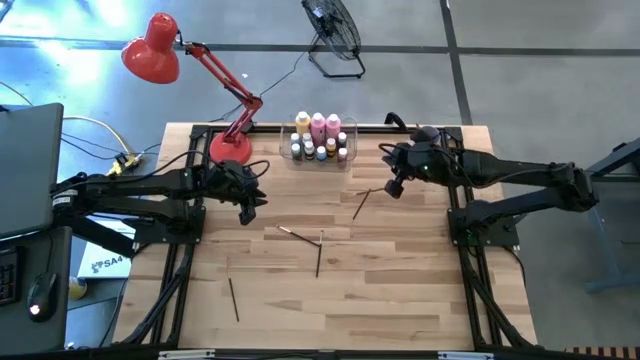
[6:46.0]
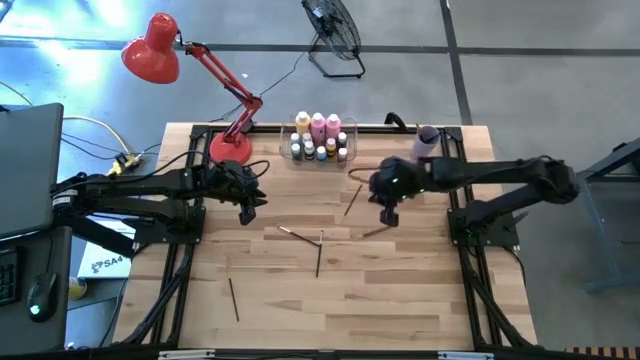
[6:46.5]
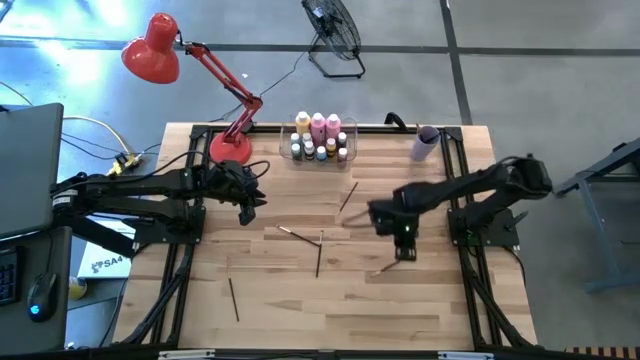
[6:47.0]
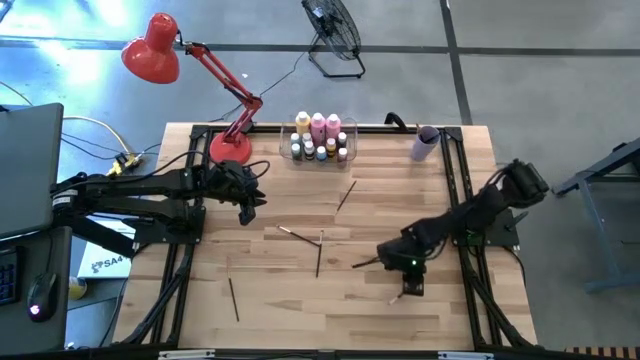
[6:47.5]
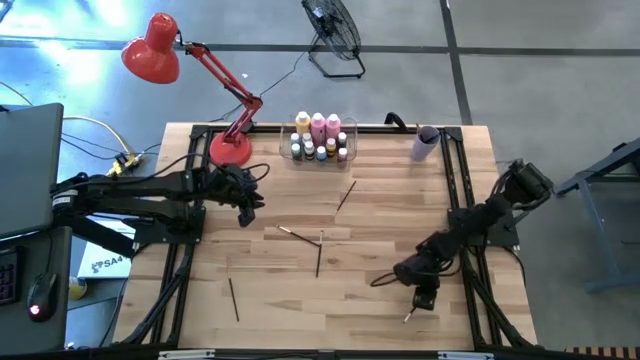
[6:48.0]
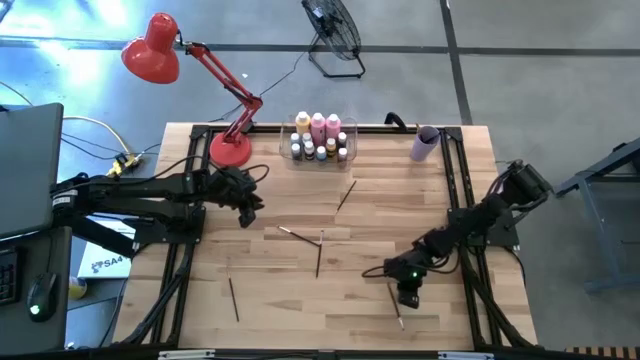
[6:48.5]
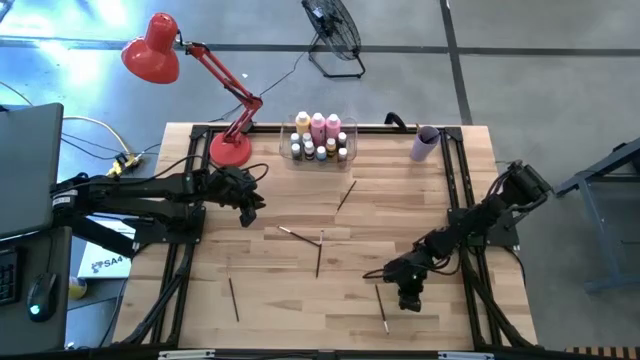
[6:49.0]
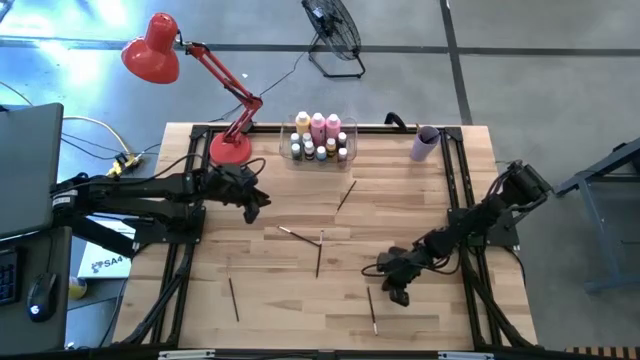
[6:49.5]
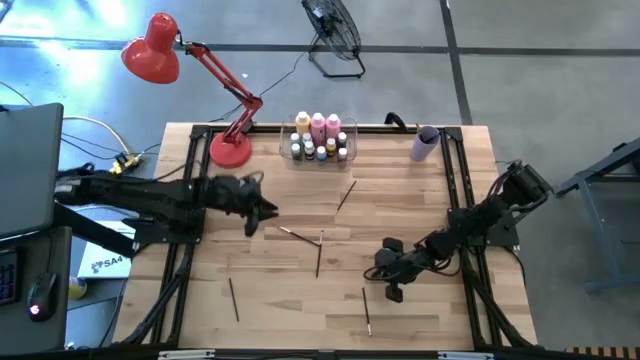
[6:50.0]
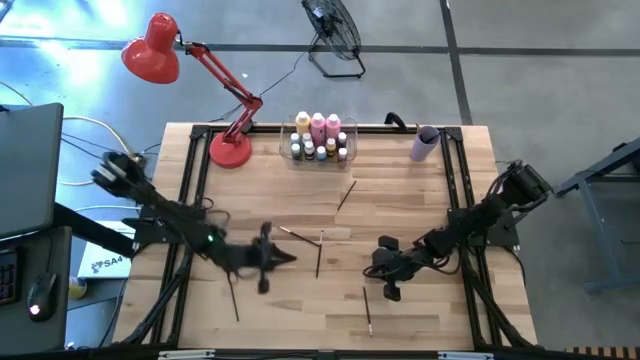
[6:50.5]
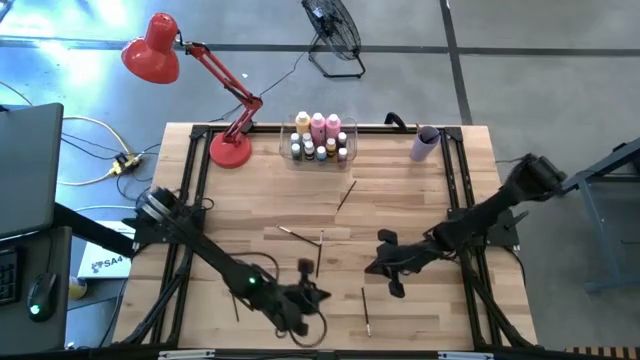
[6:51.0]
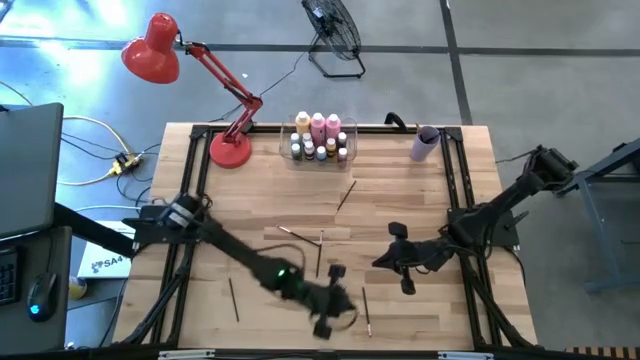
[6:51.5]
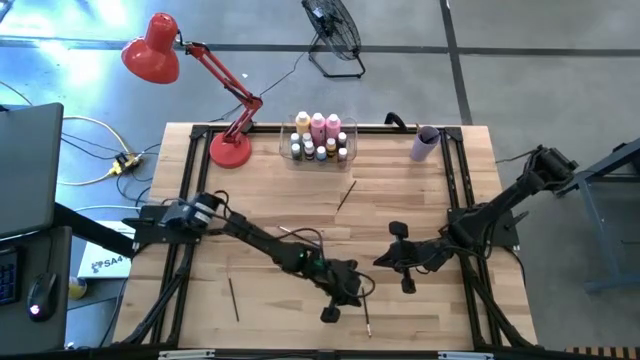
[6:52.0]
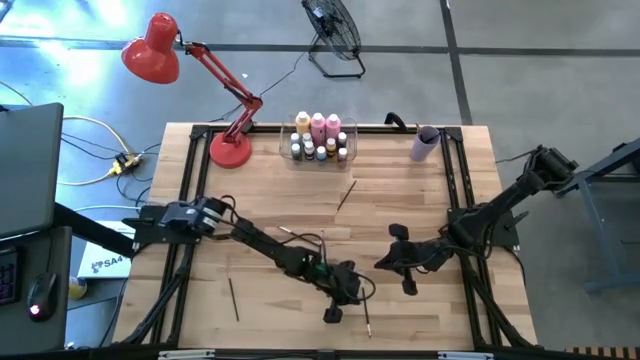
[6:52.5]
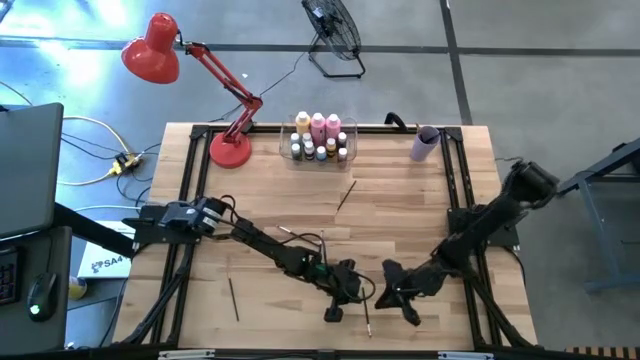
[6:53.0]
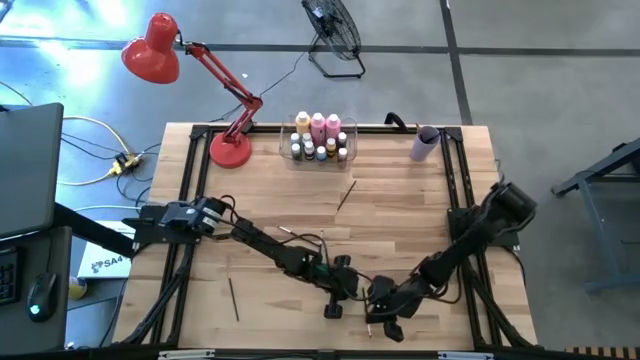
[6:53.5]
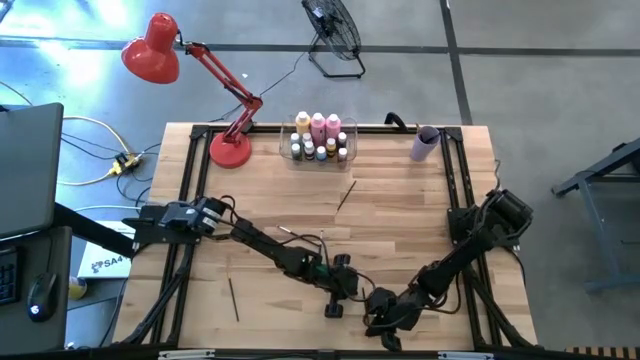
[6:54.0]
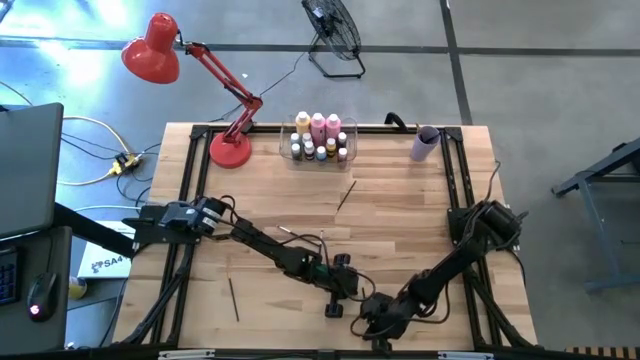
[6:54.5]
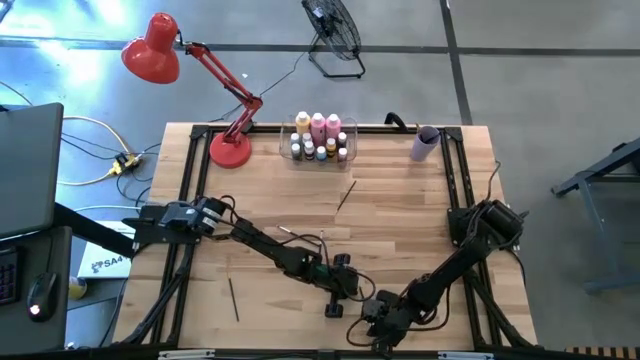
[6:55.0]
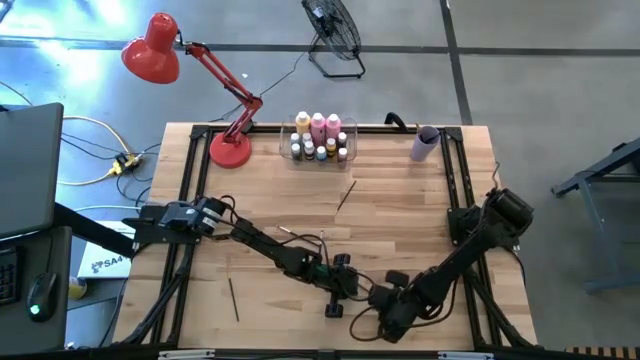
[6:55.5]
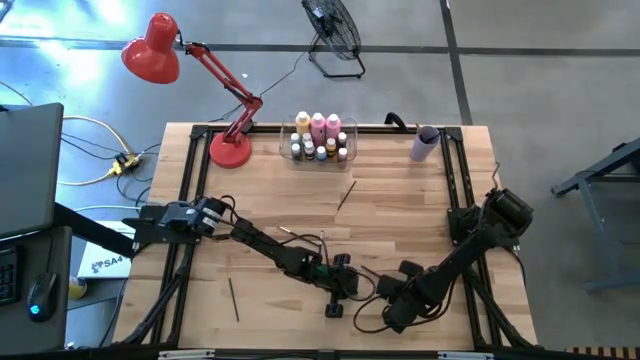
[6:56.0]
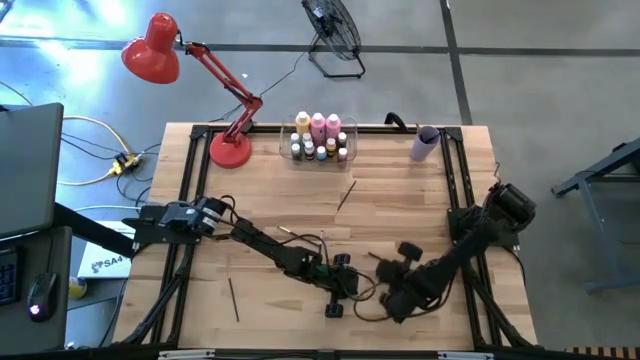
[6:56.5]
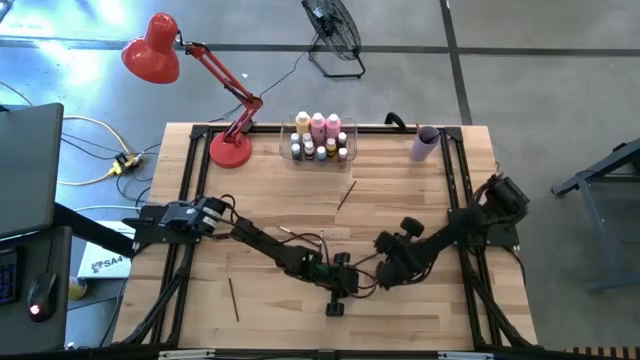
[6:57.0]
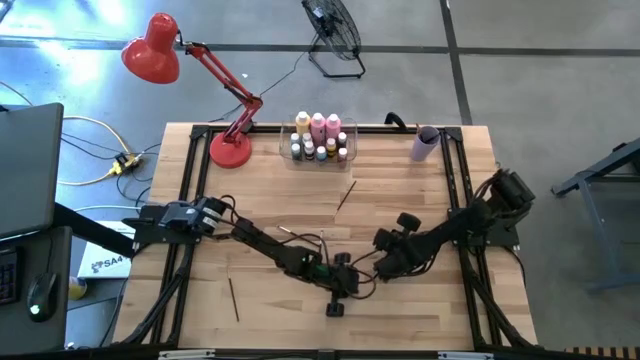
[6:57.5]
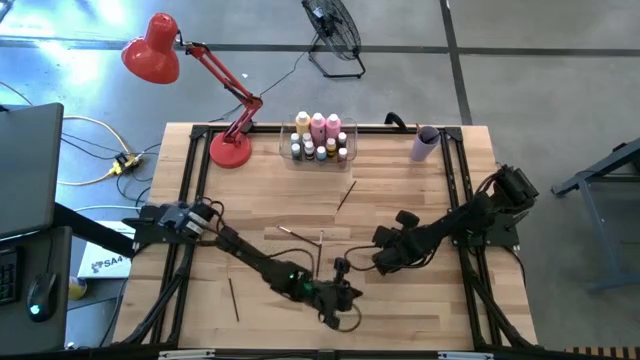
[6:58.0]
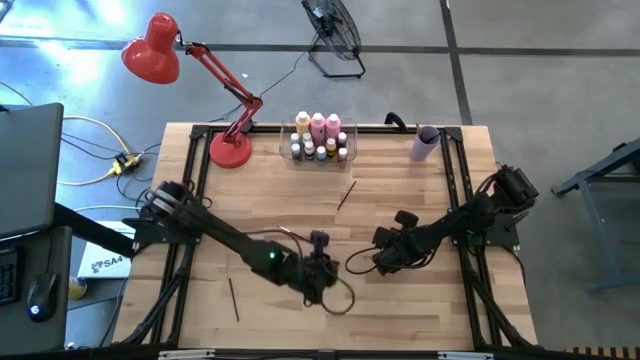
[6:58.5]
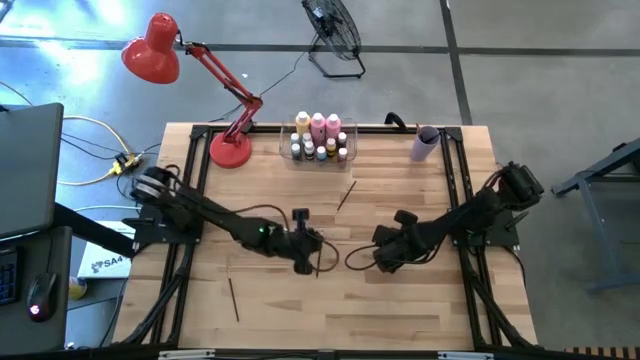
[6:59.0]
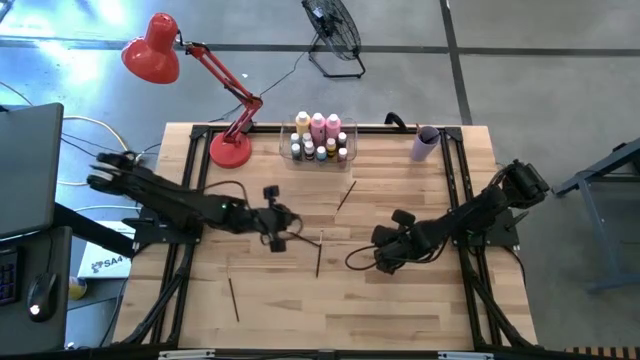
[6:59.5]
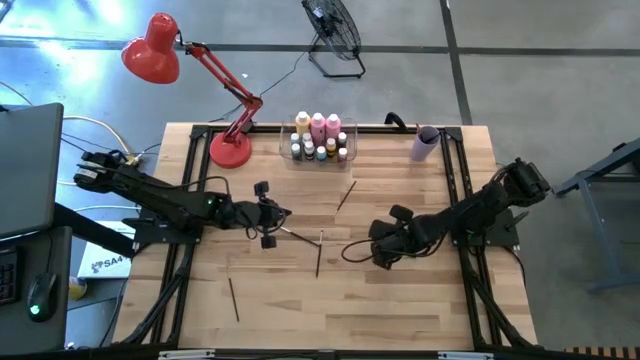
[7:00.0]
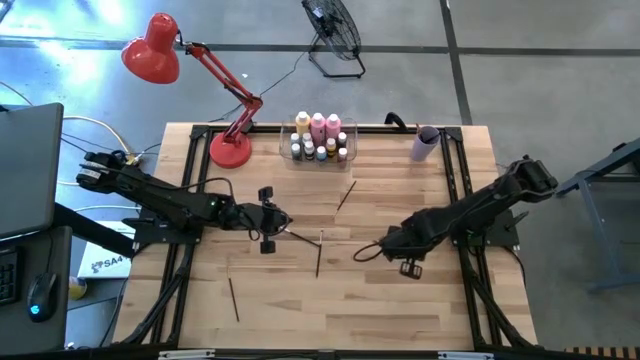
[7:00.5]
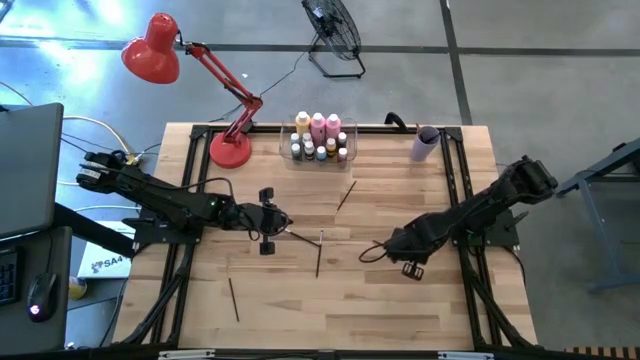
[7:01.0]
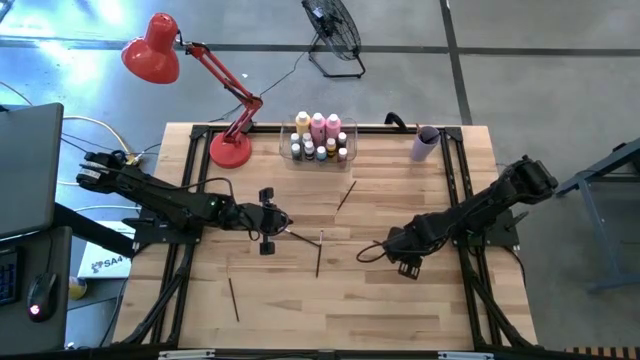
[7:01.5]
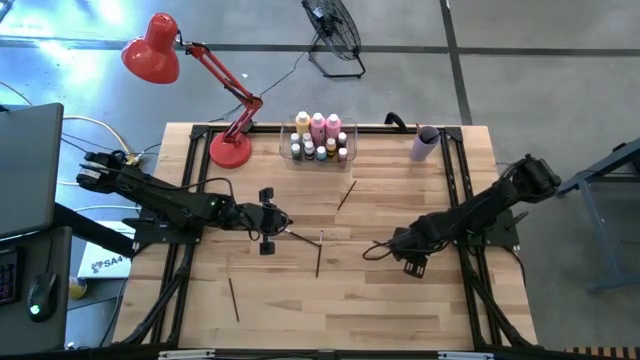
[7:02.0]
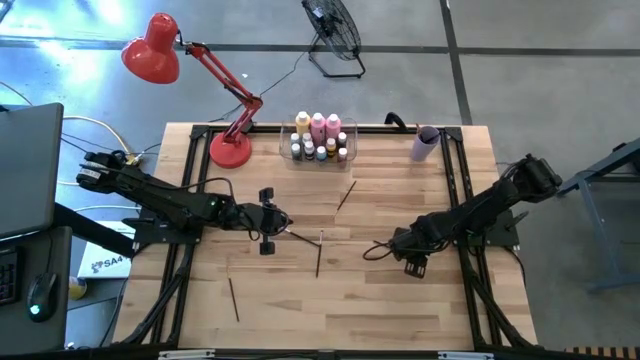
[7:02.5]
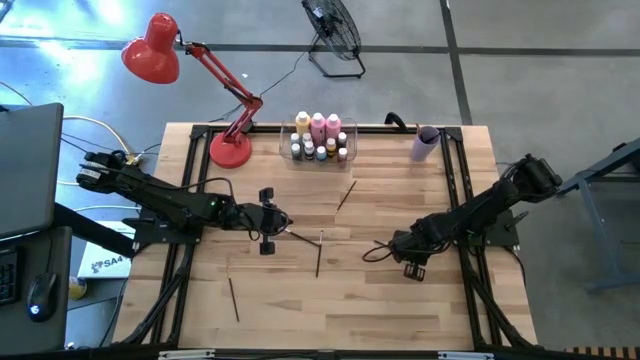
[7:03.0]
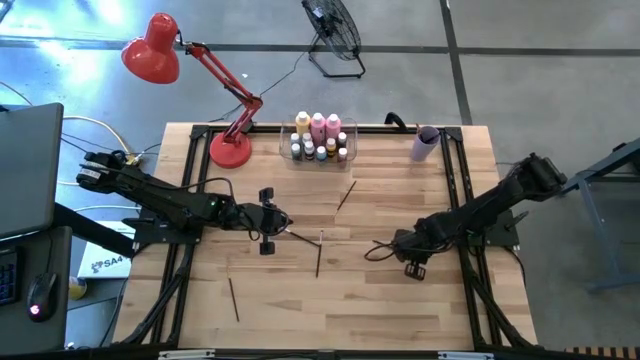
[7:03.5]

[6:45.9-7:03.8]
Task: Pick & Place Paint Supplies
Put the black paint brush into the violet cup

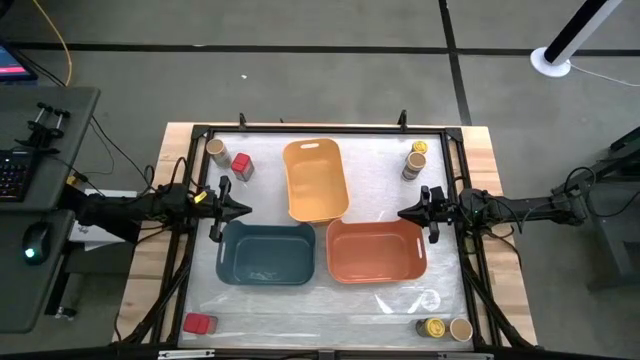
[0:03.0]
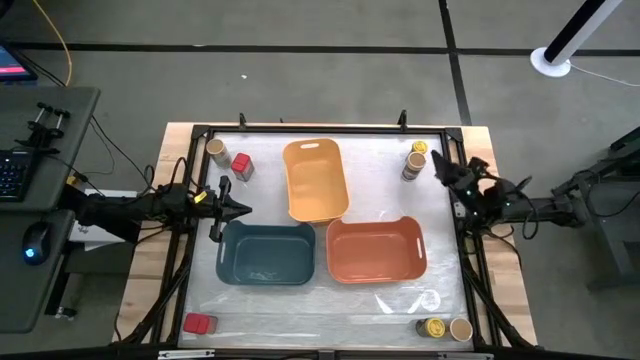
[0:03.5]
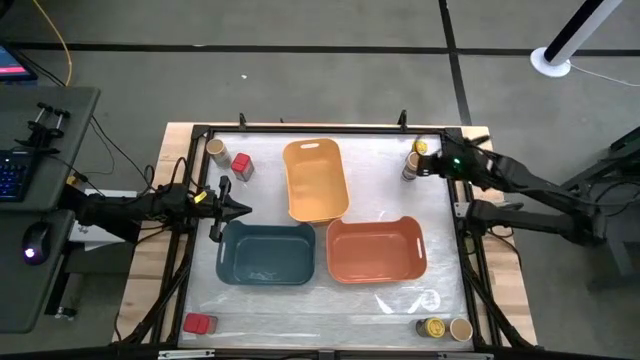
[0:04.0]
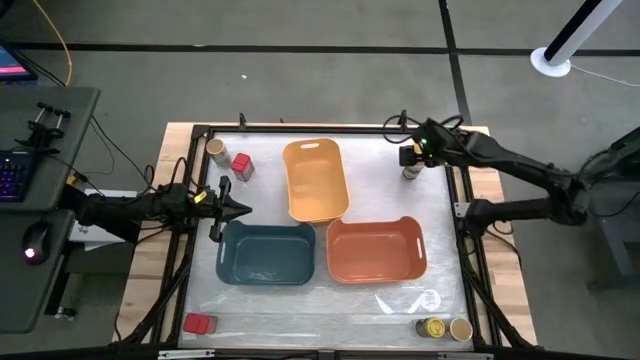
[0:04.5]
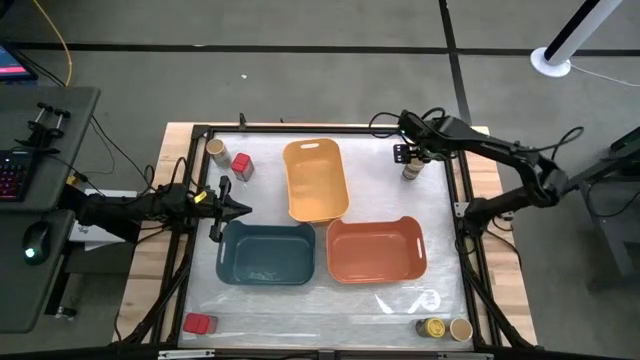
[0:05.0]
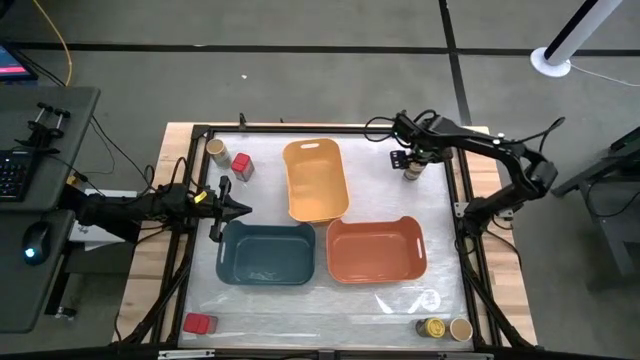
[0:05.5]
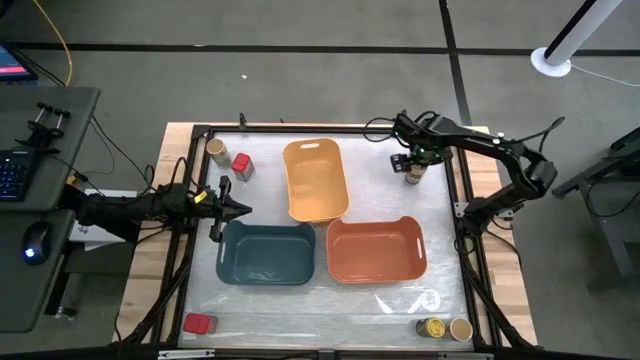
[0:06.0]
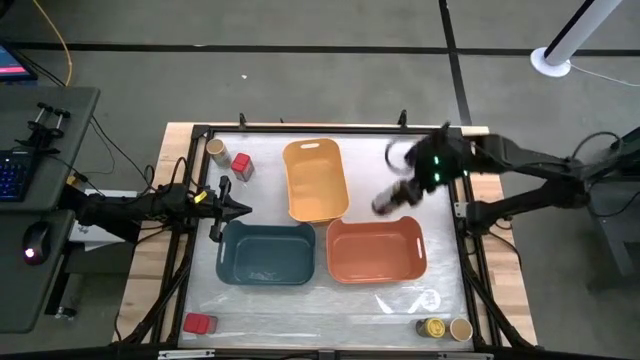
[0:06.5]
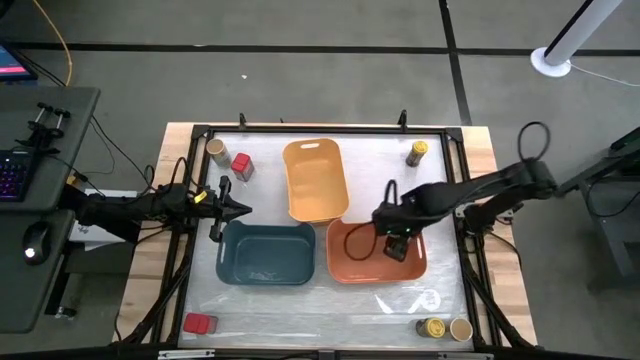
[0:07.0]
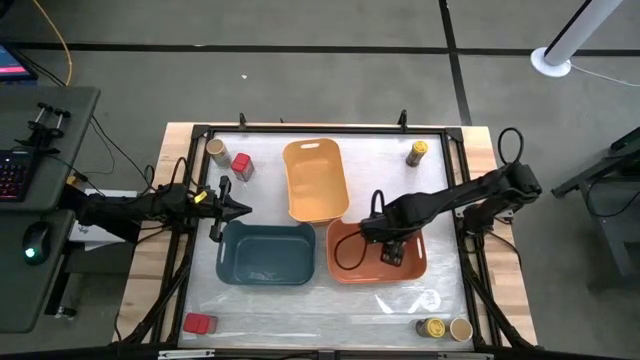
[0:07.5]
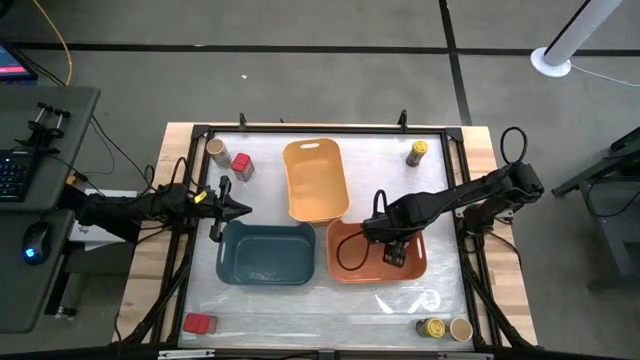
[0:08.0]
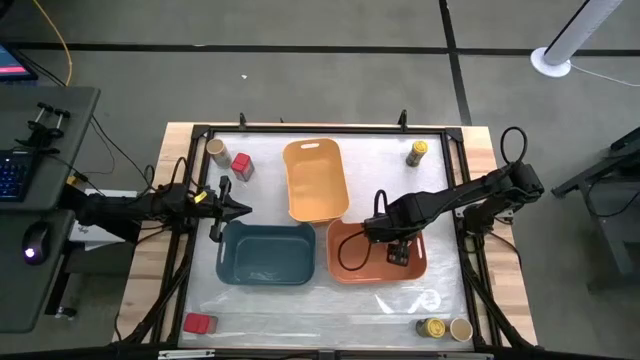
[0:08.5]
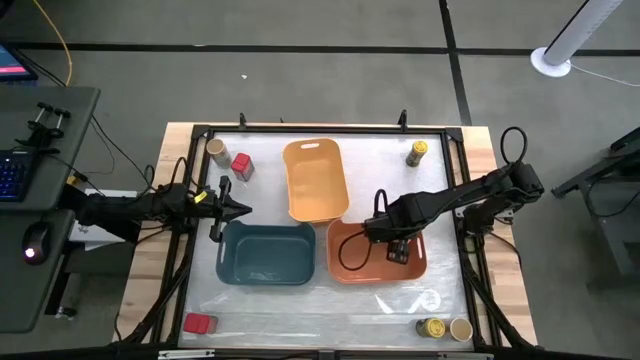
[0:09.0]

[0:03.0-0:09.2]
Task: Sort spices by type
Put the top right brown seasoning bottle into the orange bin
